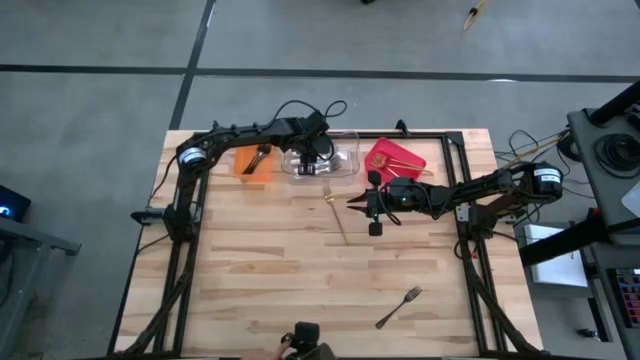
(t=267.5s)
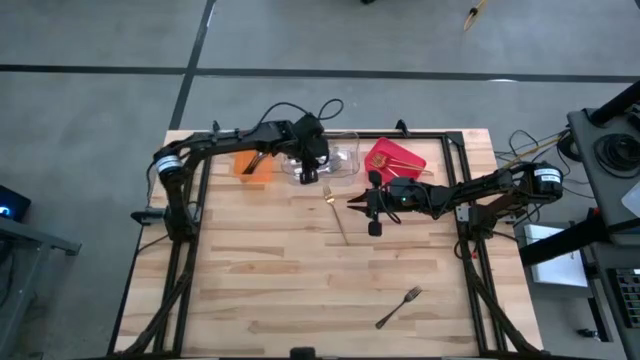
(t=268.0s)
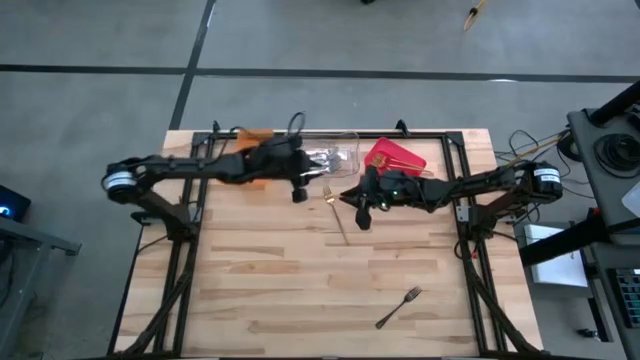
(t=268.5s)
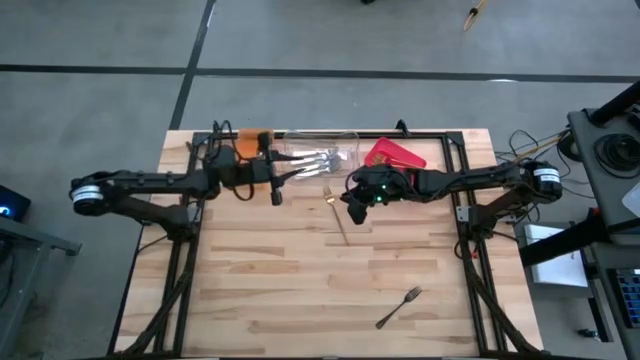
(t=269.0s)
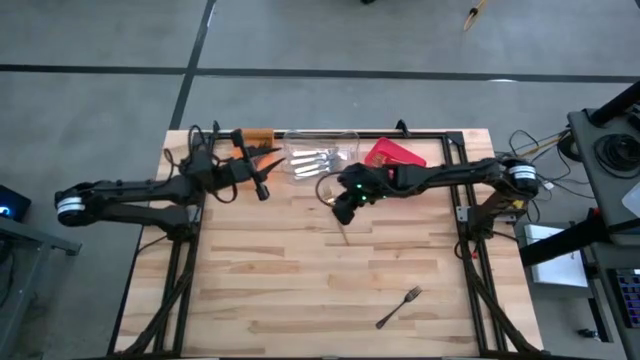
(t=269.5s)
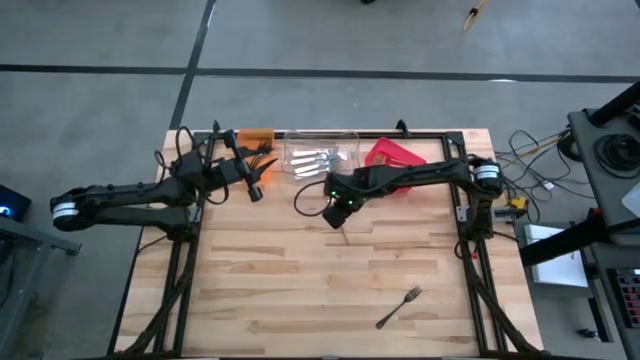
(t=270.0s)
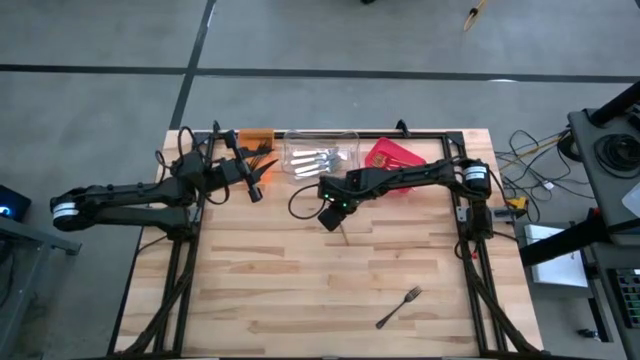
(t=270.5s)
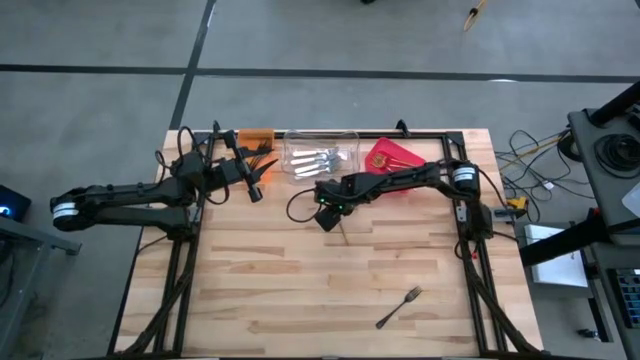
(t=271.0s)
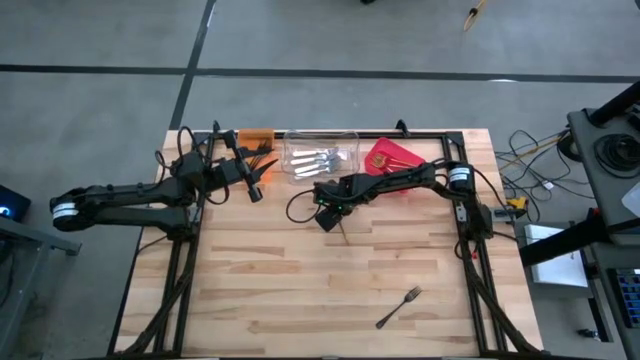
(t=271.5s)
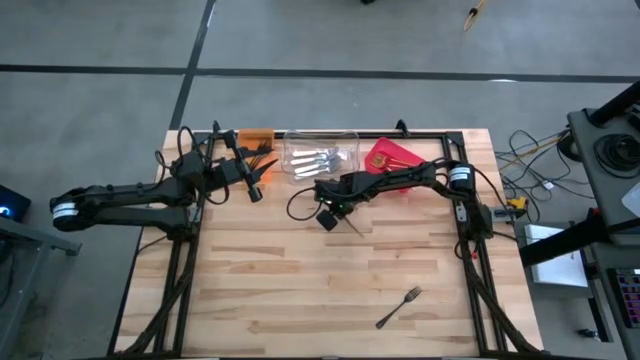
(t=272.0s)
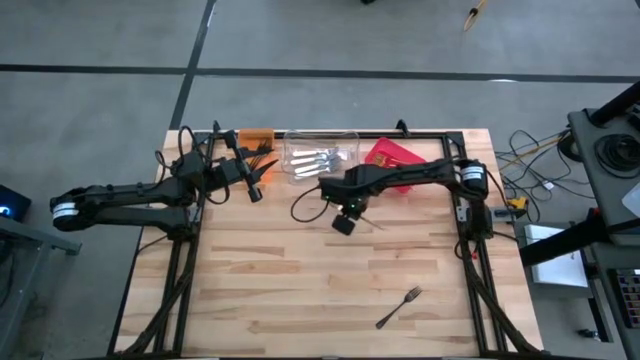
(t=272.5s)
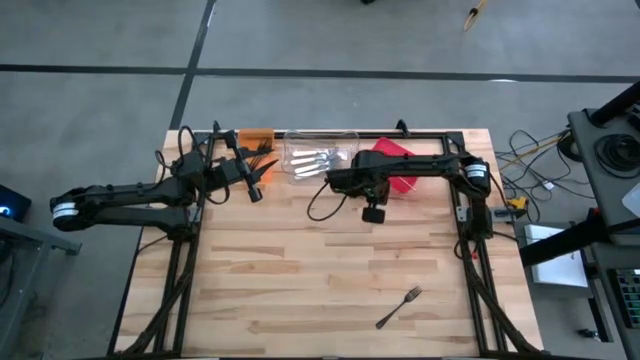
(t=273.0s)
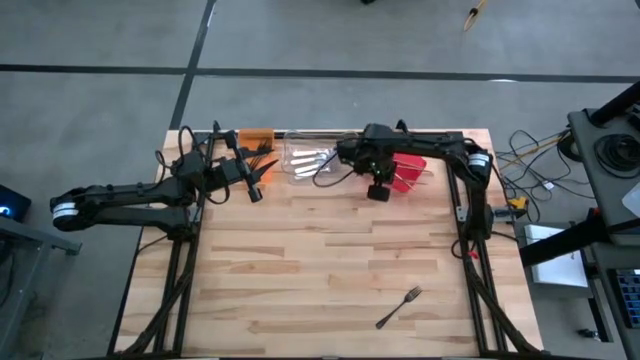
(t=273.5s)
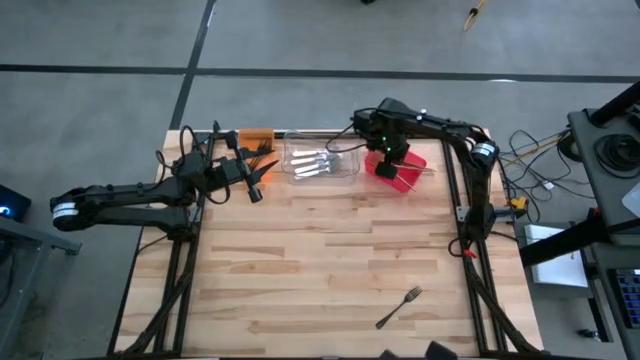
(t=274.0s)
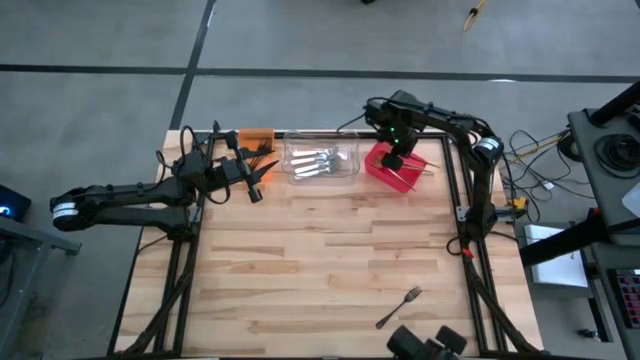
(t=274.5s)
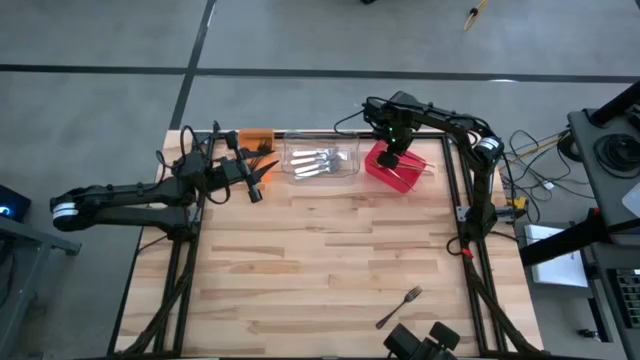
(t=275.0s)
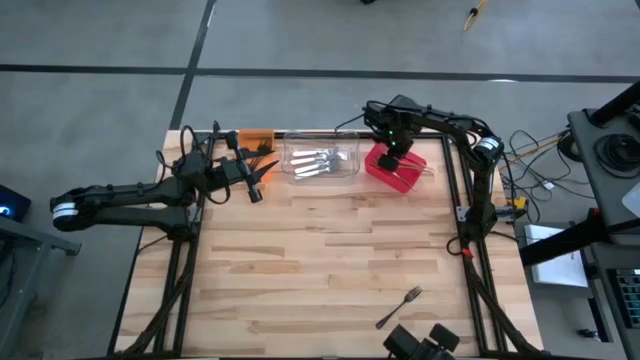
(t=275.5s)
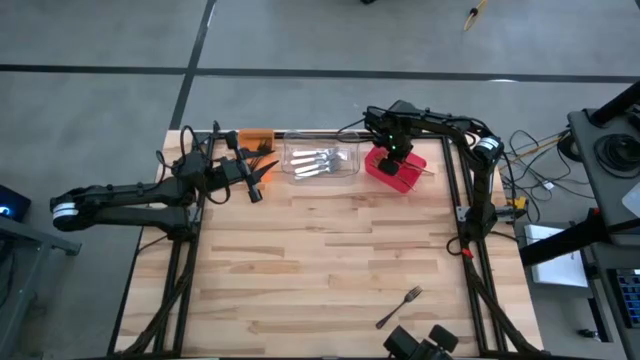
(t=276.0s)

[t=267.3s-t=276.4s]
Task: Sort silverware by color (type)
Put the gold fork into the red bin

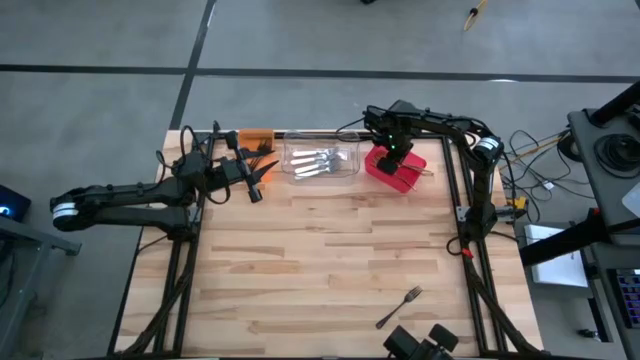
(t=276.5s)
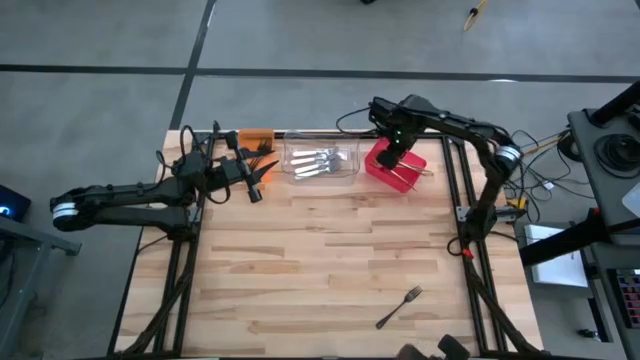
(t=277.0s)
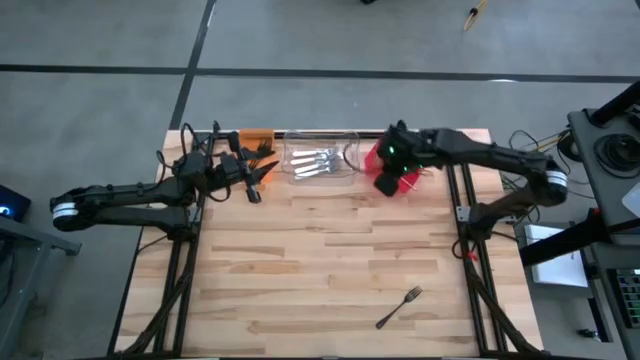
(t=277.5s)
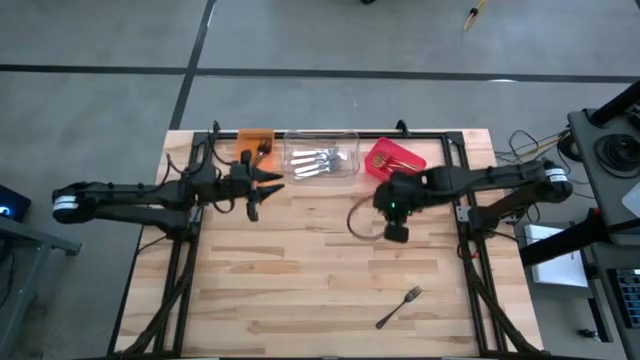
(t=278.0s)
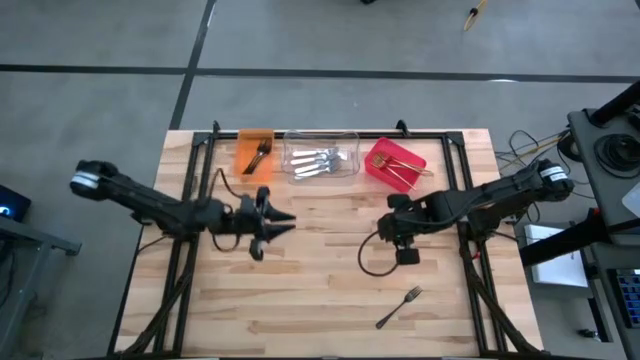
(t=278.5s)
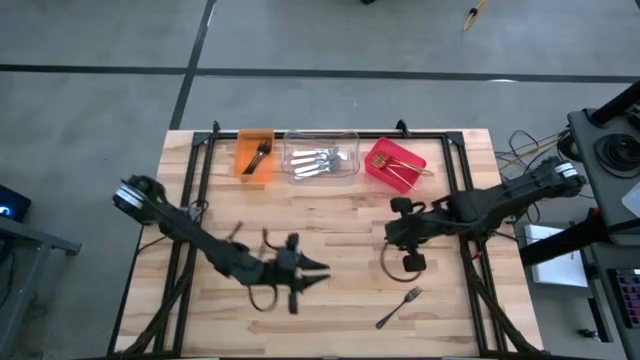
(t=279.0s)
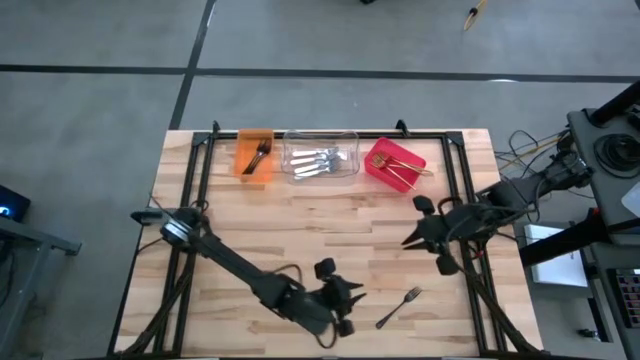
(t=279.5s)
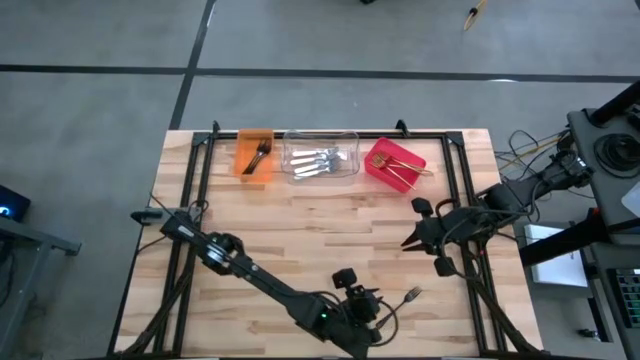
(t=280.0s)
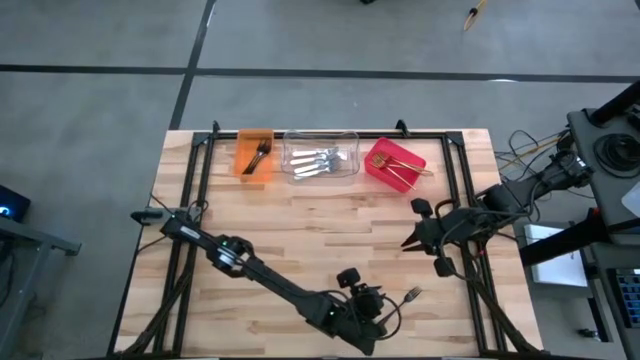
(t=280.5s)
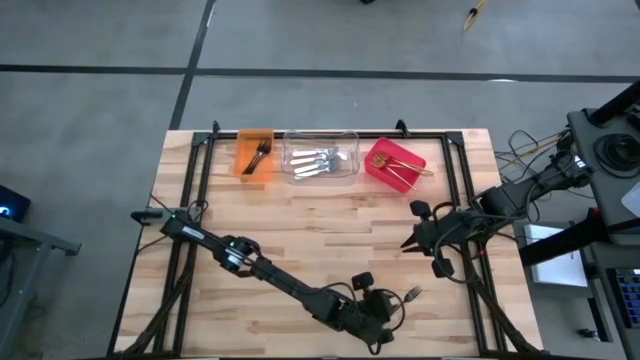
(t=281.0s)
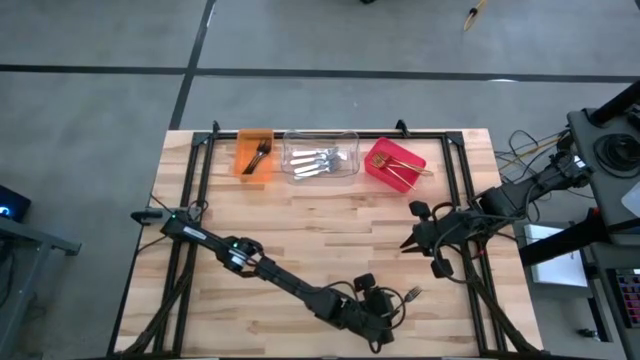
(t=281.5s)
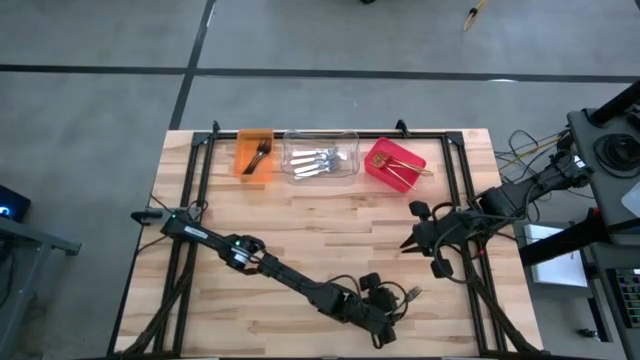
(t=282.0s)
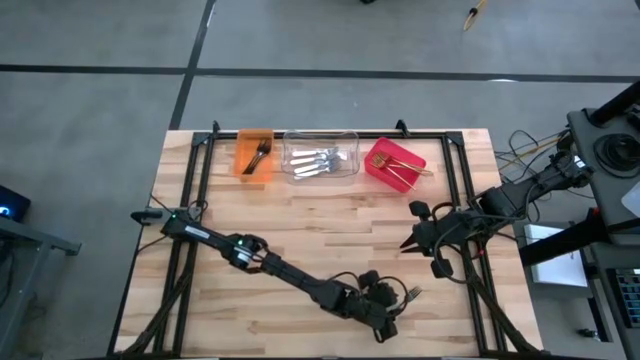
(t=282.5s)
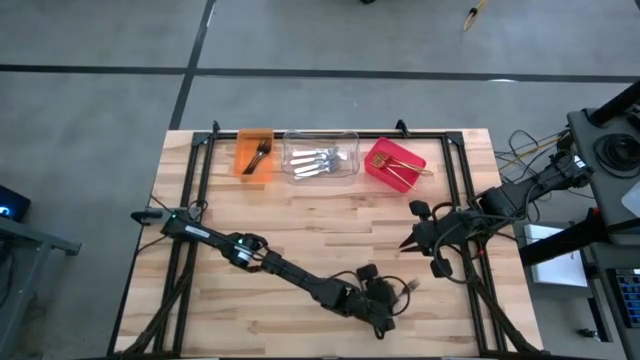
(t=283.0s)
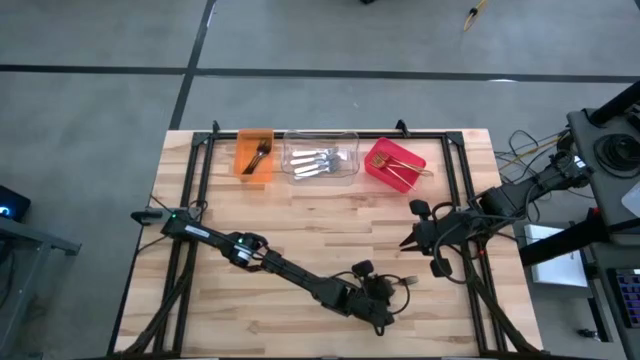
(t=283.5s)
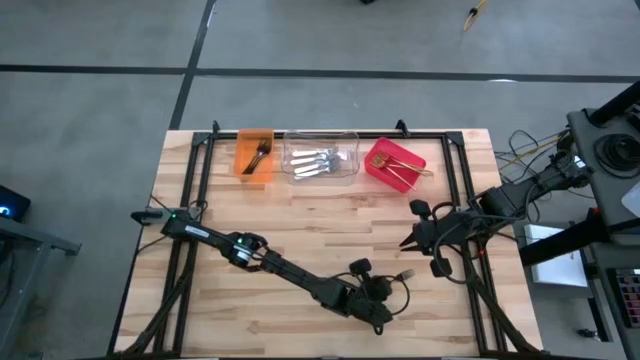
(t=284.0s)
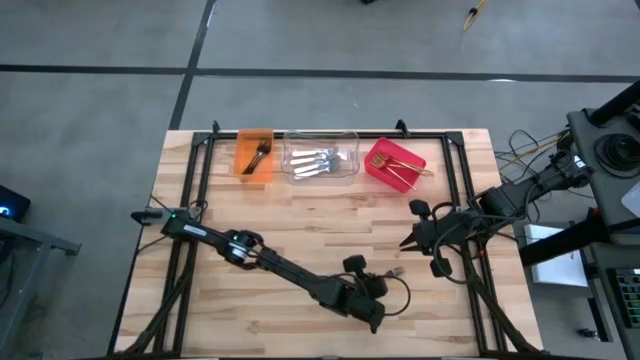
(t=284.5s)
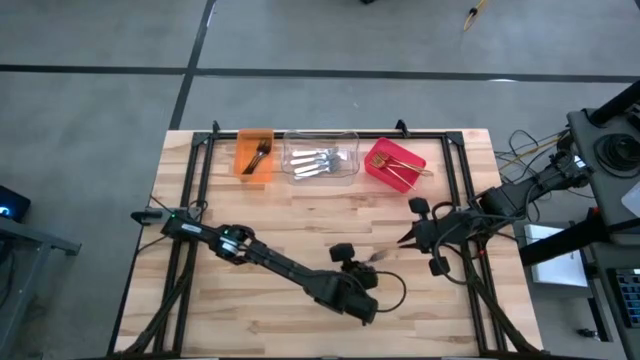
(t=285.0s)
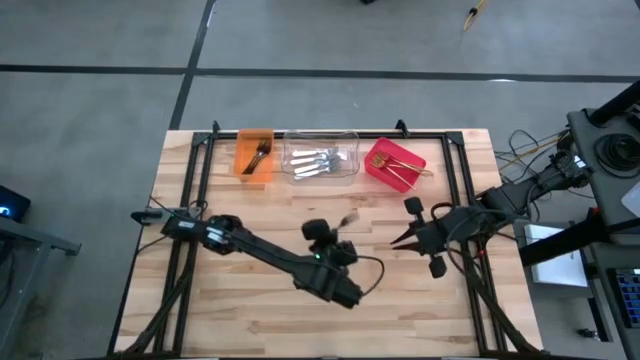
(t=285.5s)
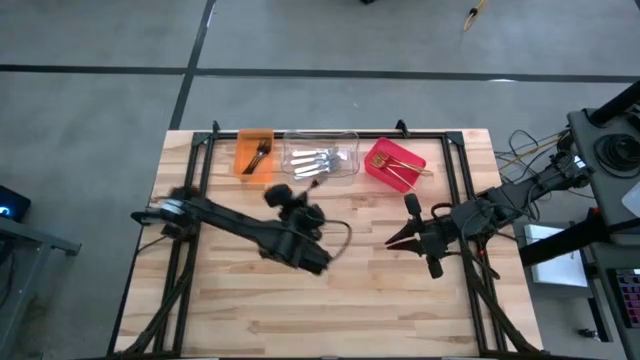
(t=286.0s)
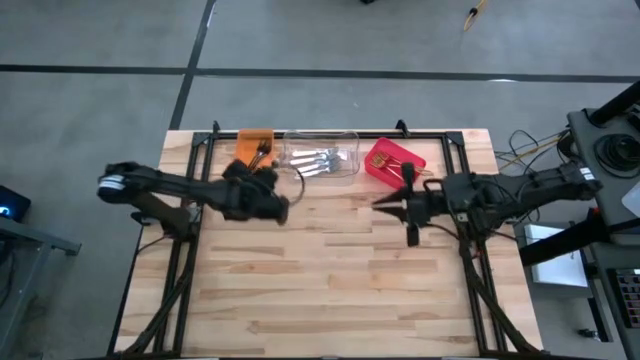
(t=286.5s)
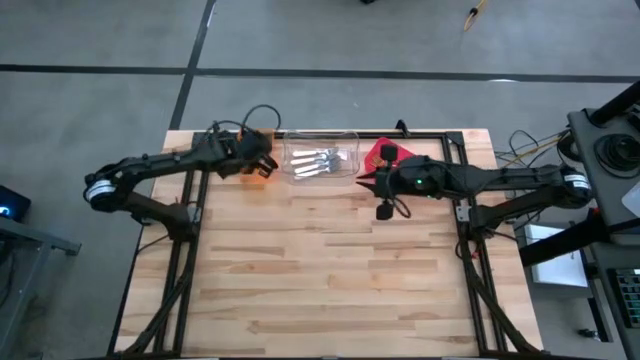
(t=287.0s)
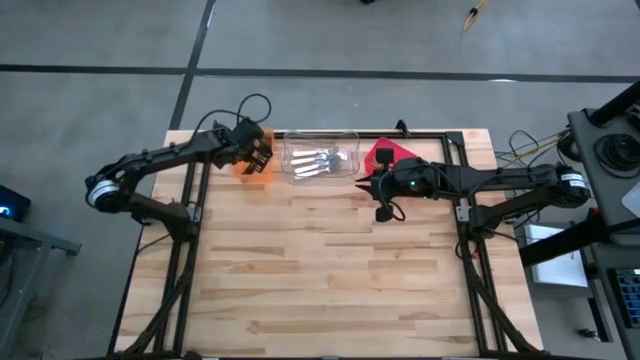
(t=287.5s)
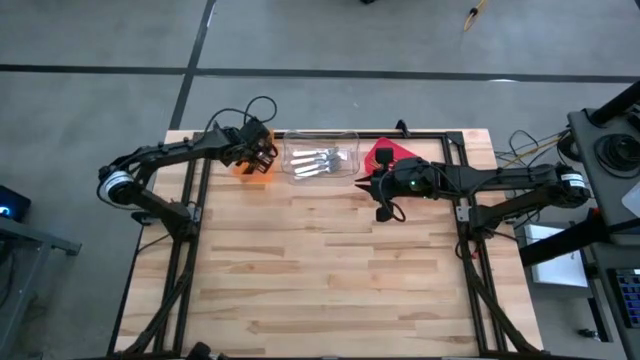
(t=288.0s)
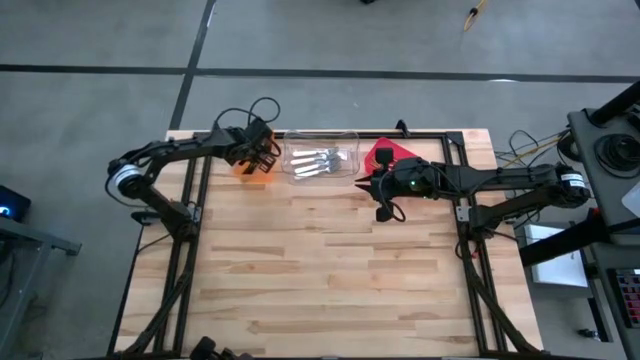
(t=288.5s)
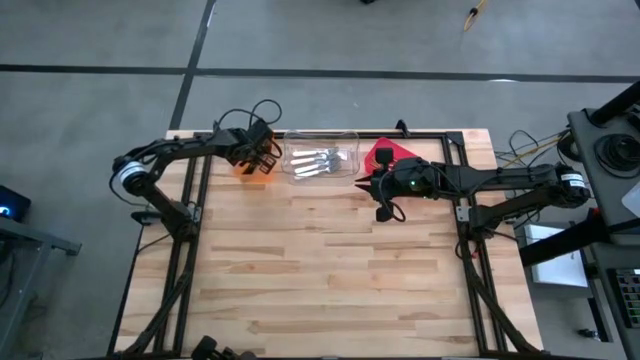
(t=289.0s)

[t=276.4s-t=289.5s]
Put the black fork into the orange bin
